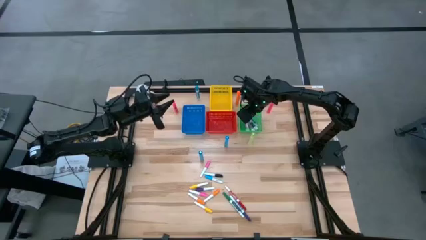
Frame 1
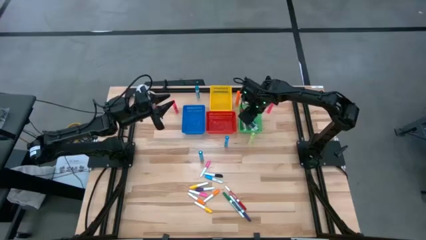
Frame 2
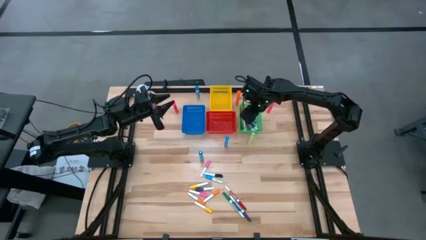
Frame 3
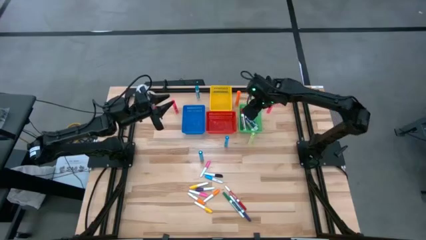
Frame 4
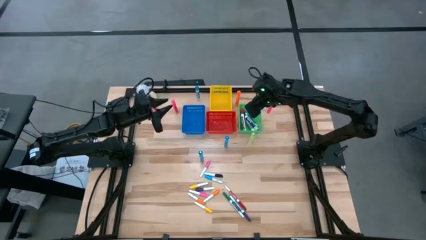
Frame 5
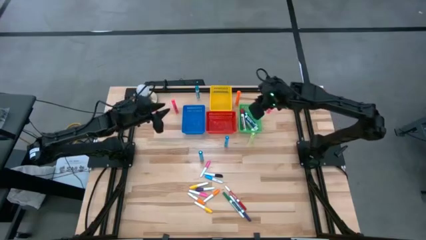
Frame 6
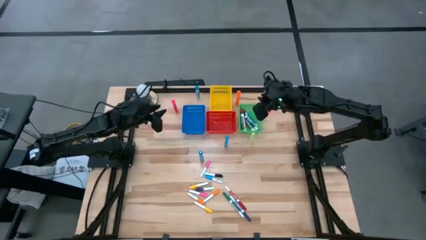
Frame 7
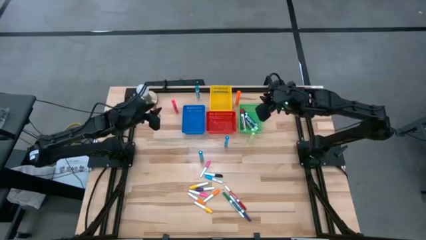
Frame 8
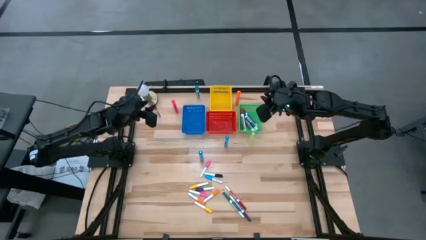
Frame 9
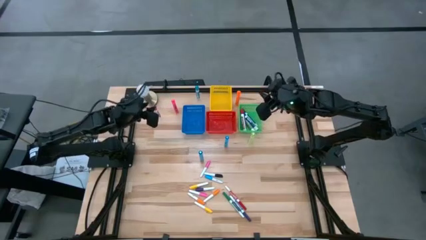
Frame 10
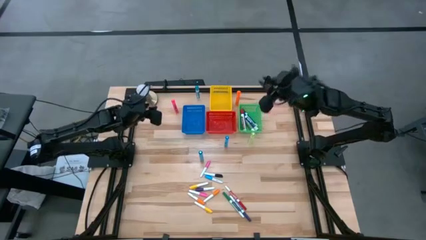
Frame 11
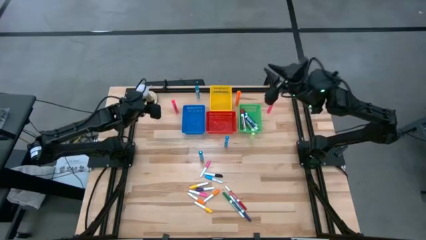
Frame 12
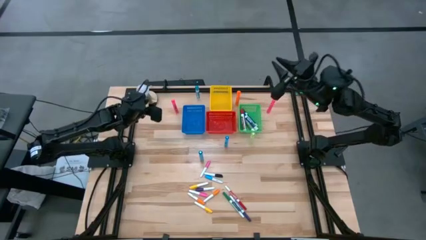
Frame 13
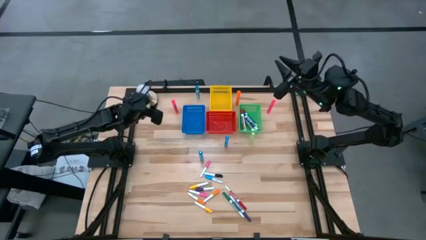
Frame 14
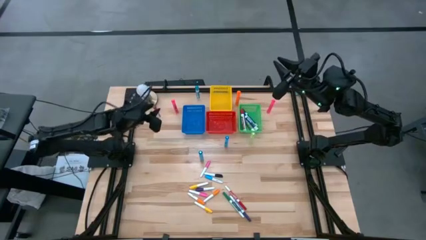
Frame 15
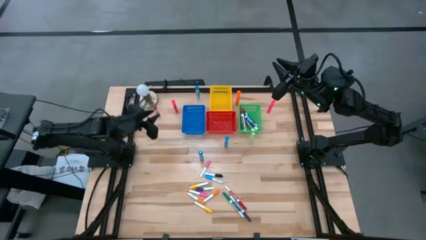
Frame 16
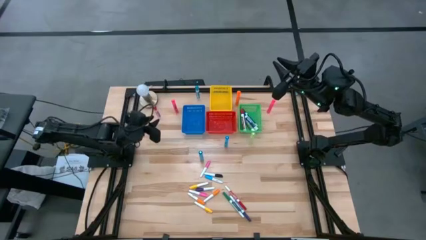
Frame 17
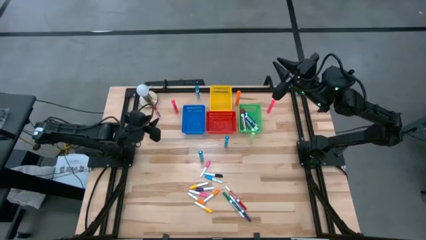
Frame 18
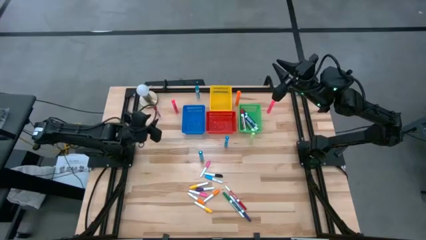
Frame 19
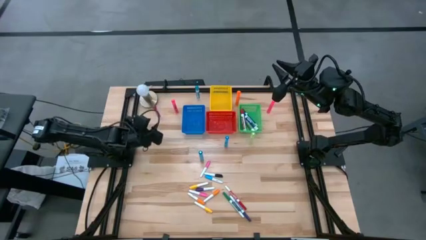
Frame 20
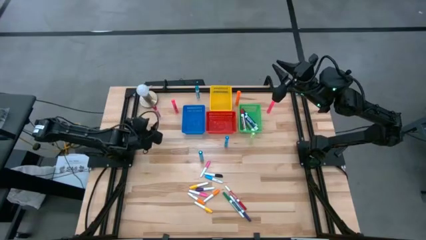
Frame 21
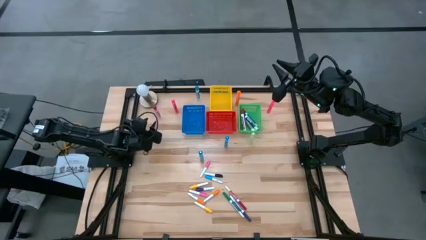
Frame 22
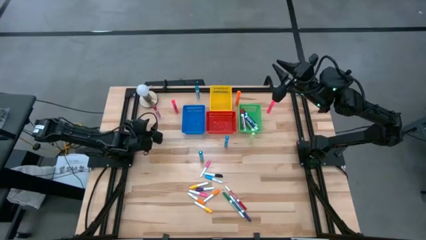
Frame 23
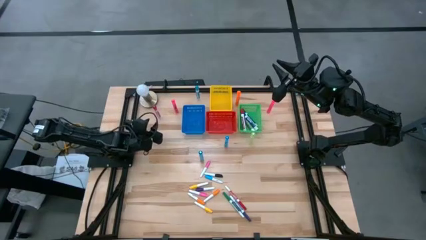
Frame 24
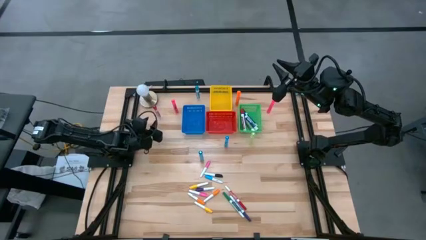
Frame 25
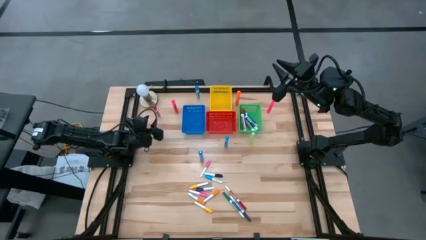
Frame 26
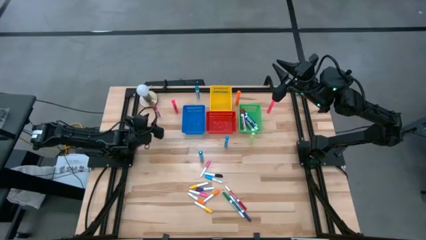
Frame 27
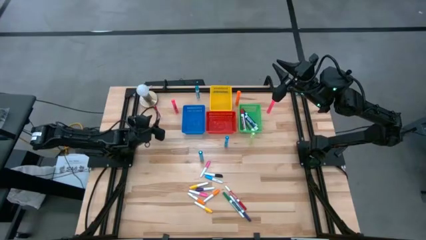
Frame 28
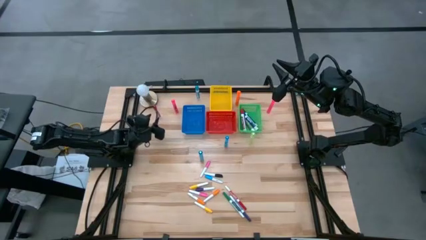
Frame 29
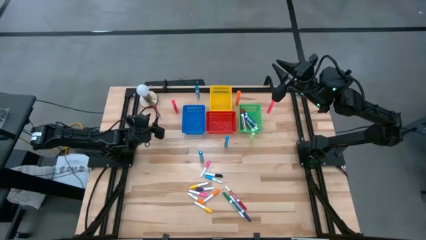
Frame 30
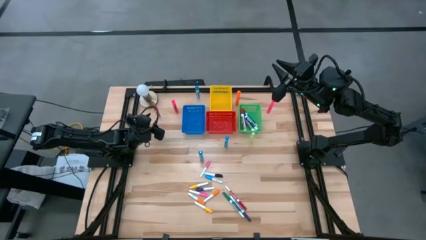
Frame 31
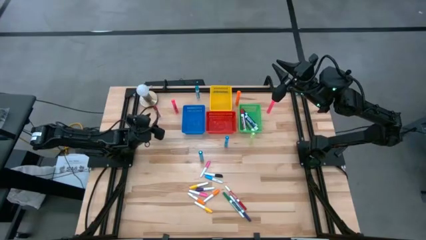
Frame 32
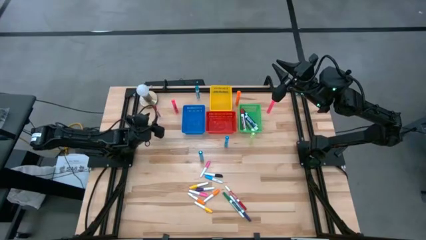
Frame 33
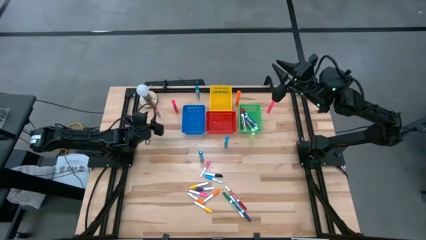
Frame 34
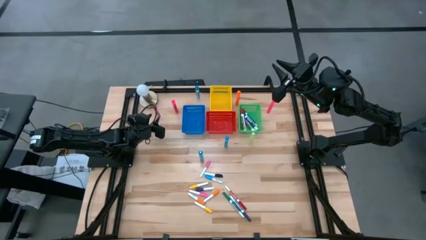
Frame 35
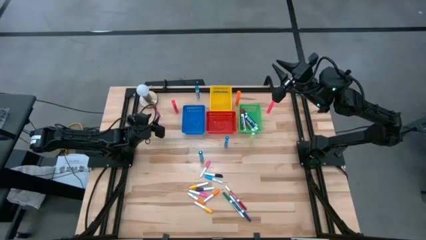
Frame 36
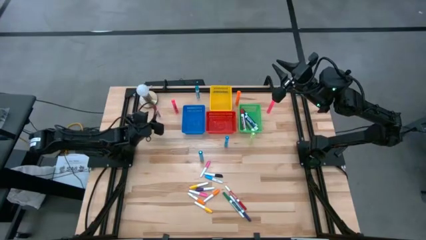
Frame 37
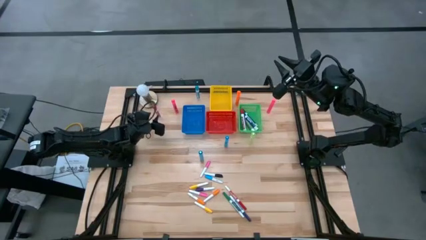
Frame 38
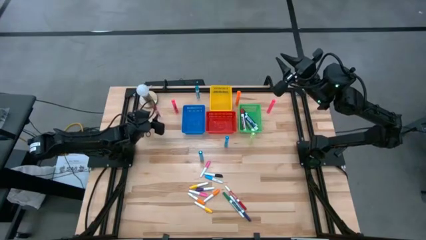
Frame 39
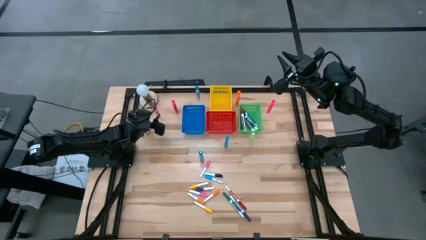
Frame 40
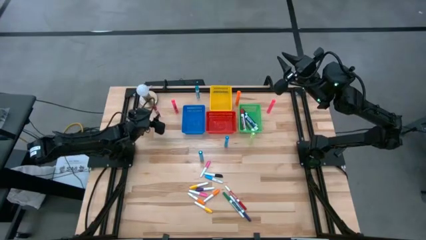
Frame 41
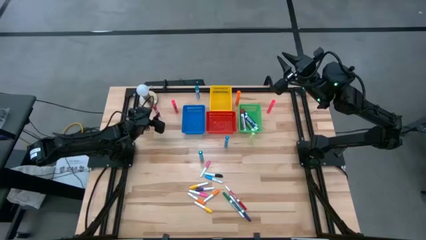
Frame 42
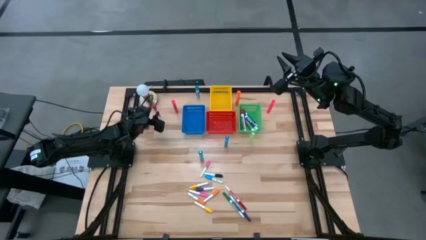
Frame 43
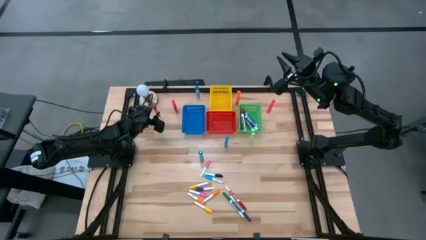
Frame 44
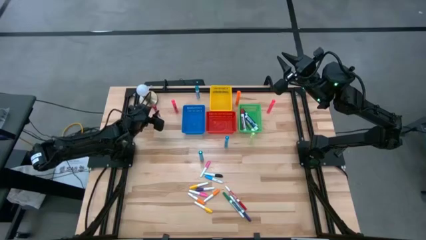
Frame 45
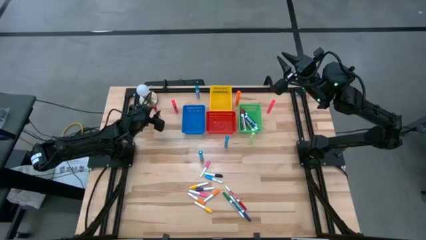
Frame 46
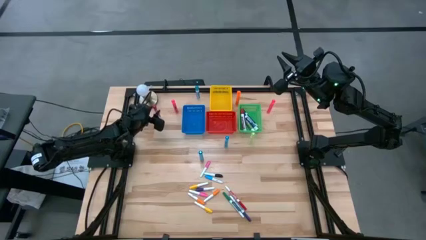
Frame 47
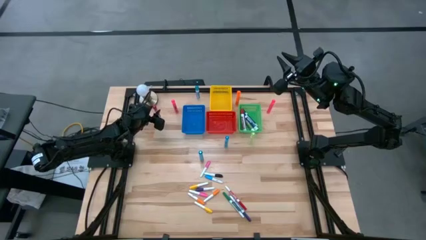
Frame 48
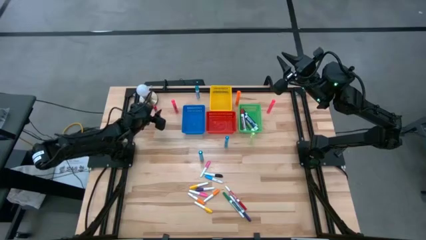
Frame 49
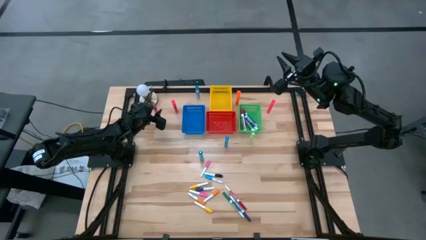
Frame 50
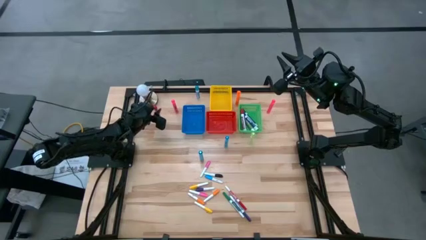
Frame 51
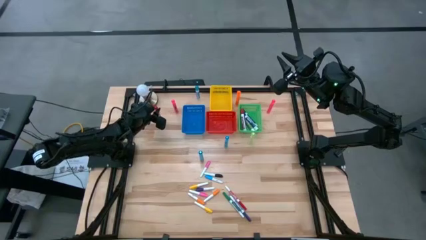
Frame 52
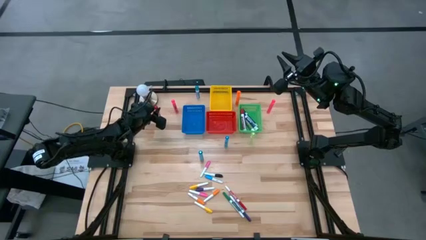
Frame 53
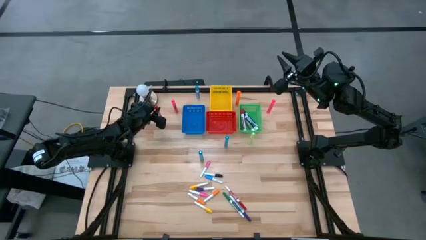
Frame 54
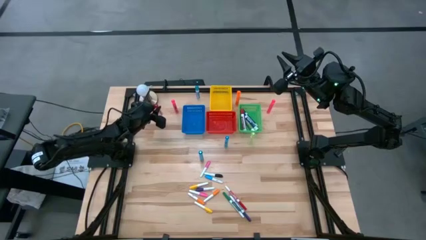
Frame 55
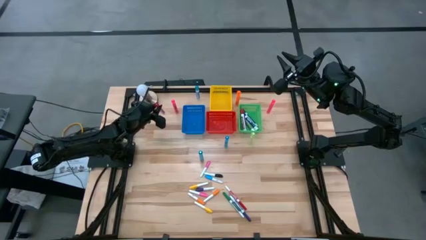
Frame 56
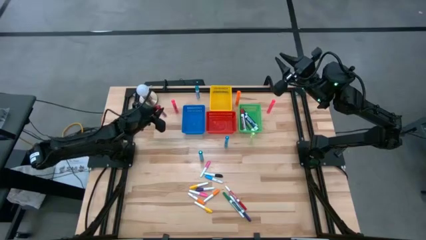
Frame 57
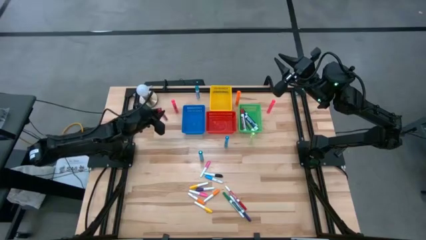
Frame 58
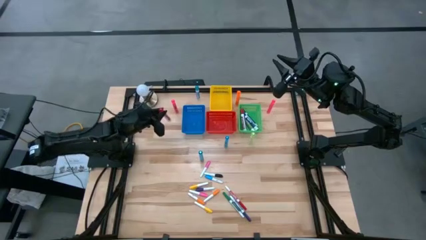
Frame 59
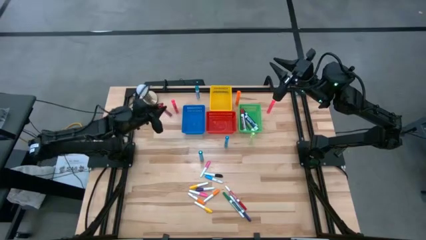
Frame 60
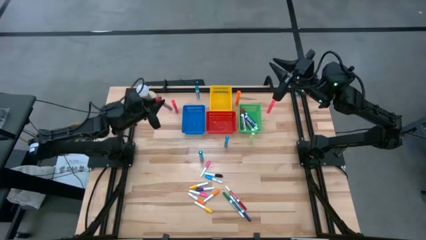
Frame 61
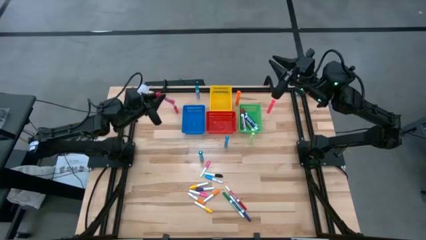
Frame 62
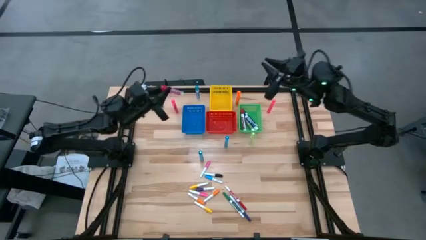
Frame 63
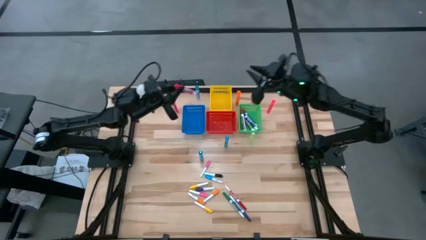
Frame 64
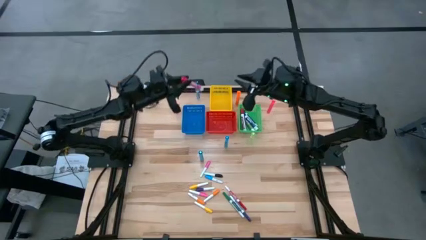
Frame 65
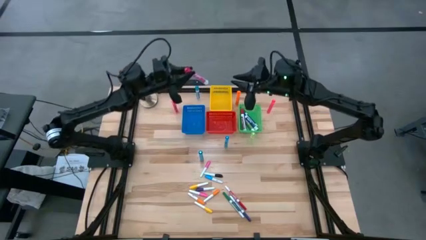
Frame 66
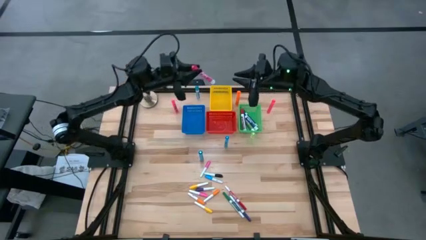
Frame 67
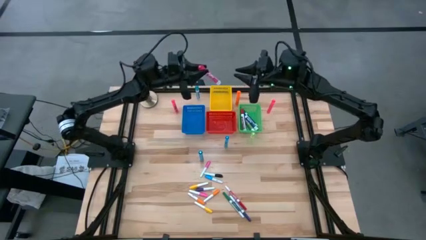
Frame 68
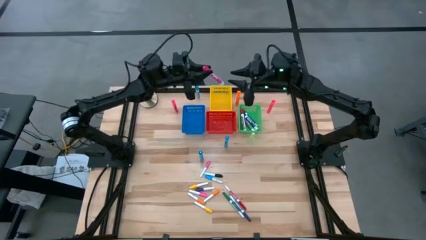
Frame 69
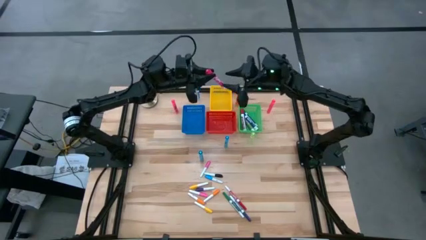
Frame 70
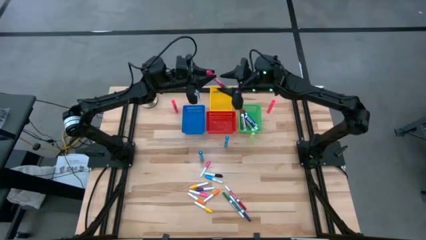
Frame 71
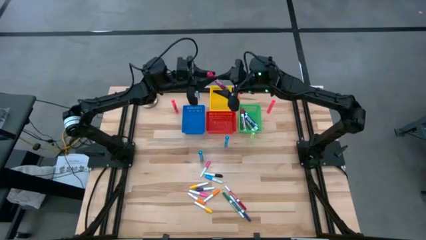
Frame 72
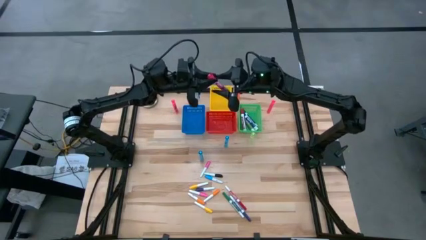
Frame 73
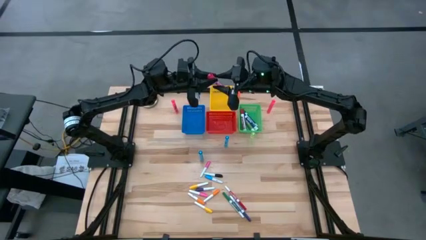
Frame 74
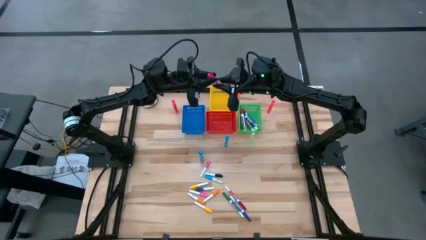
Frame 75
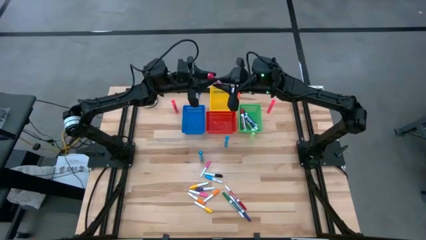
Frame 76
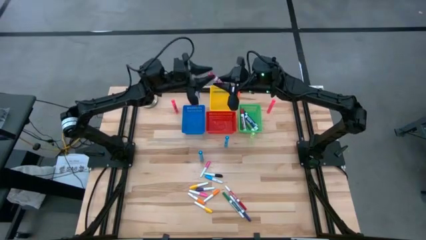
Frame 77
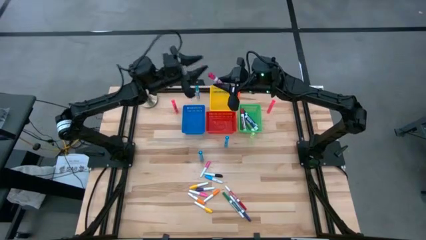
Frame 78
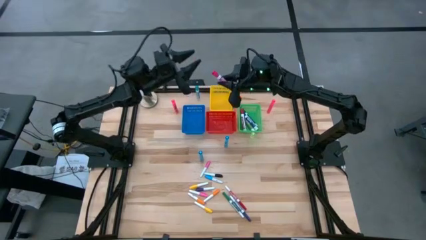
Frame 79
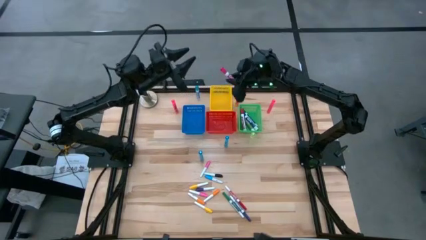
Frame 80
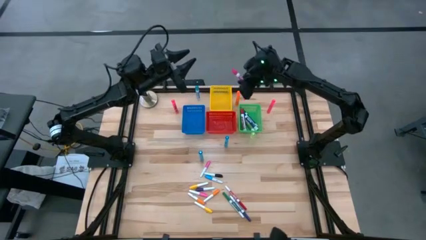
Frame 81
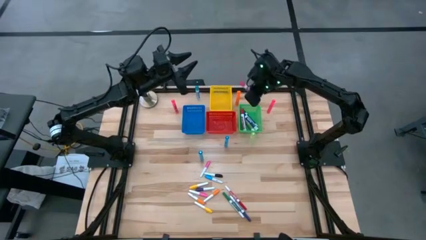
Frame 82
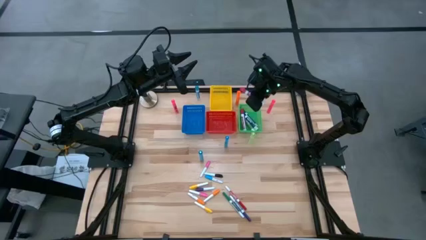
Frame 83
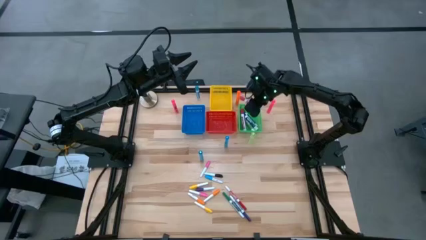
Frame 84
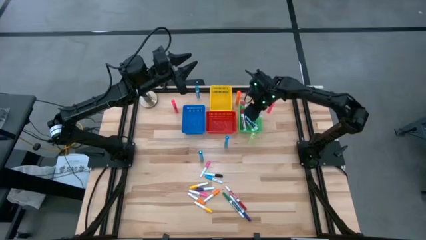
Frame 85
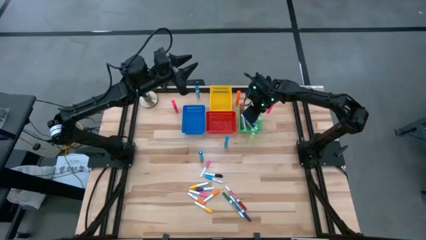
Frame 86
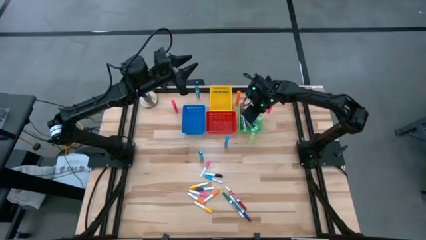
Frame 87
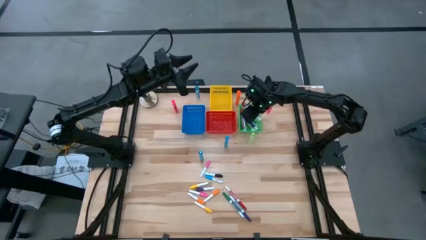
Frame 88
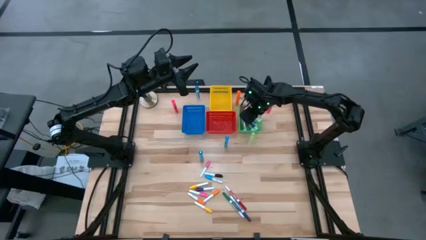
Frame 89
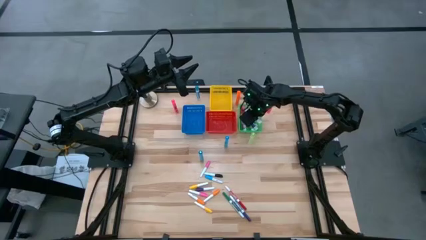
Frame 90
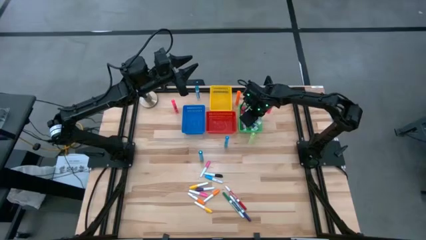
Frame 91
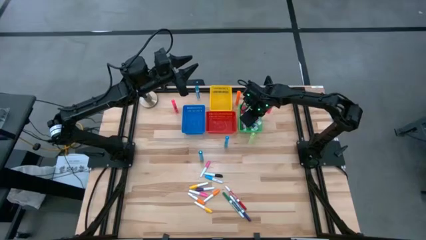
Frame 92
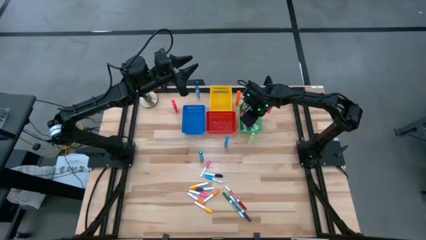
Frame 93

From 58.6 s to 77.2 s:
Task: Pick & Place Markers
Put the large pink marker pen into the green bin
